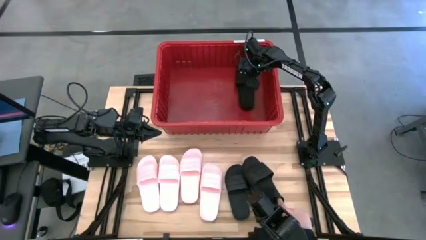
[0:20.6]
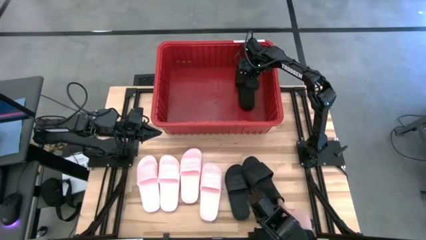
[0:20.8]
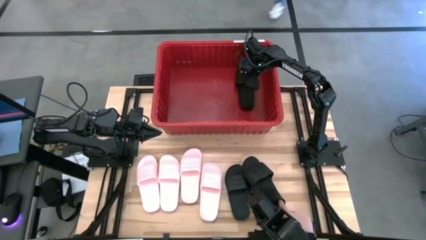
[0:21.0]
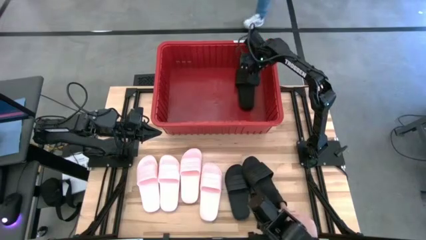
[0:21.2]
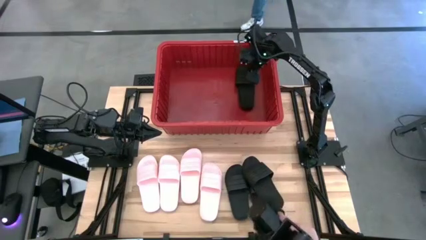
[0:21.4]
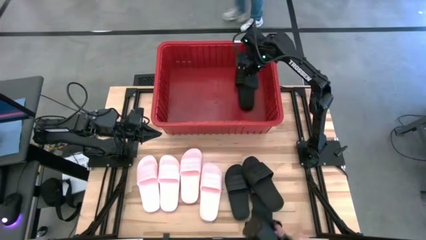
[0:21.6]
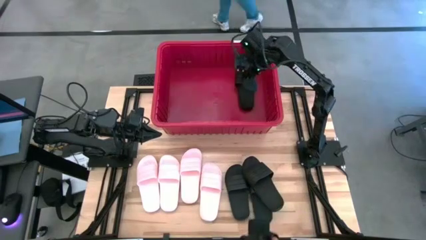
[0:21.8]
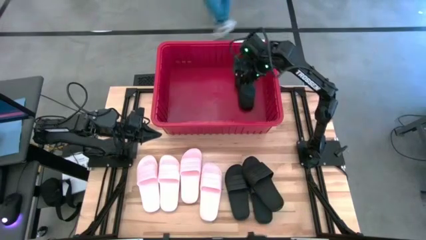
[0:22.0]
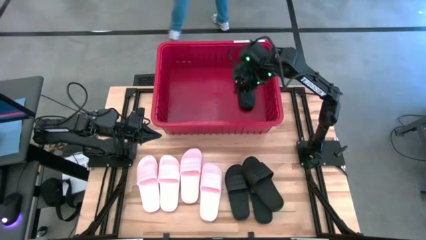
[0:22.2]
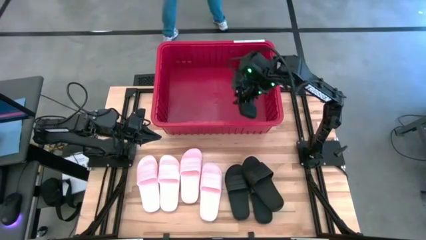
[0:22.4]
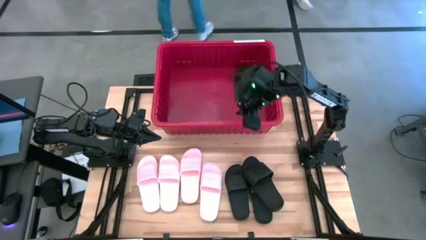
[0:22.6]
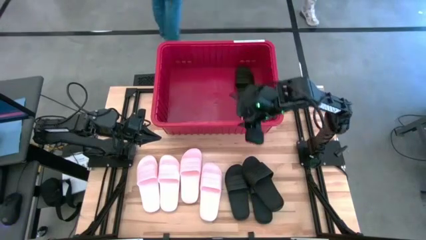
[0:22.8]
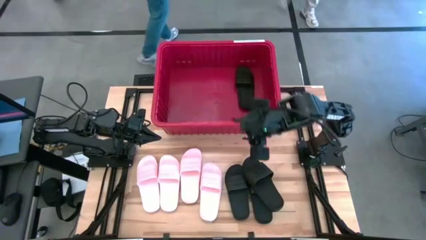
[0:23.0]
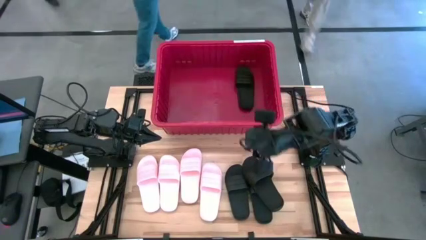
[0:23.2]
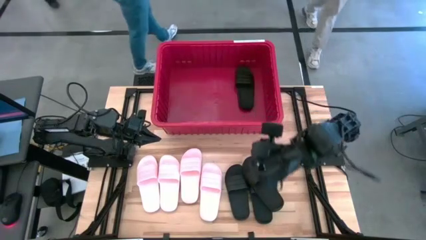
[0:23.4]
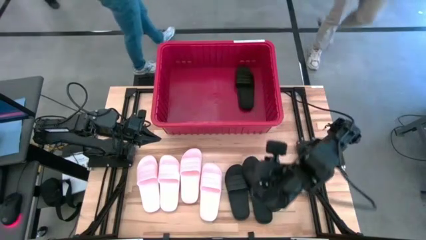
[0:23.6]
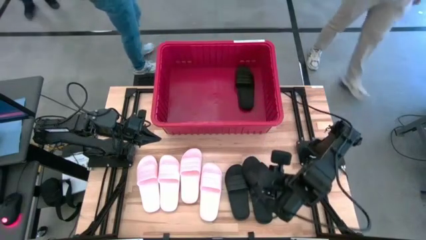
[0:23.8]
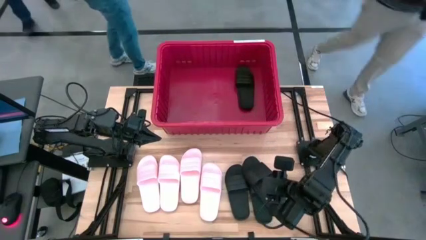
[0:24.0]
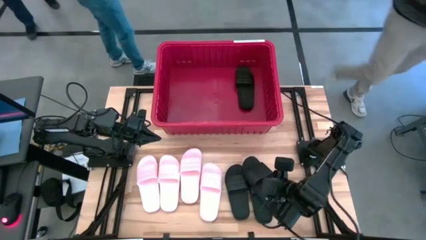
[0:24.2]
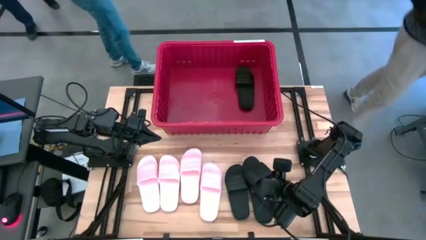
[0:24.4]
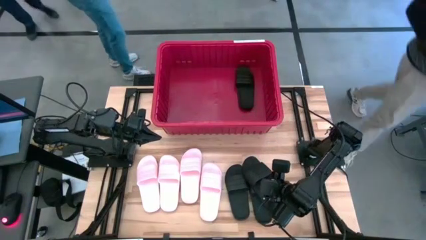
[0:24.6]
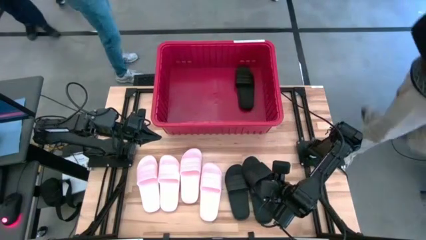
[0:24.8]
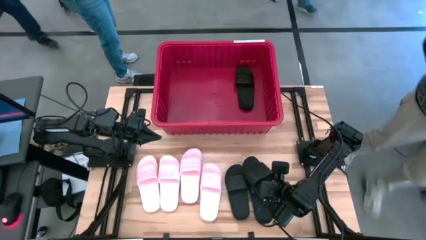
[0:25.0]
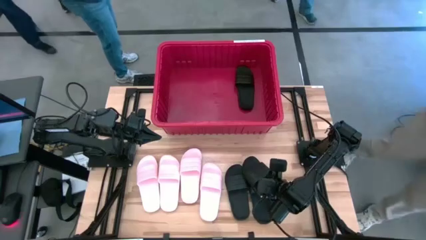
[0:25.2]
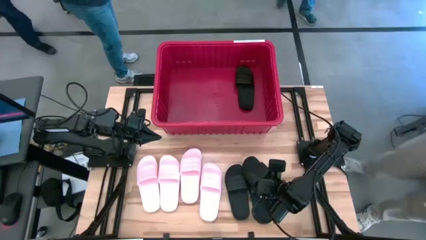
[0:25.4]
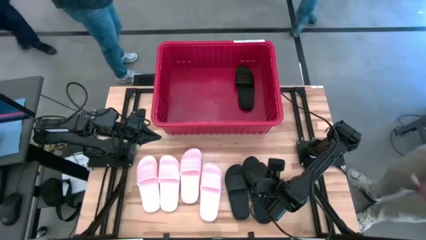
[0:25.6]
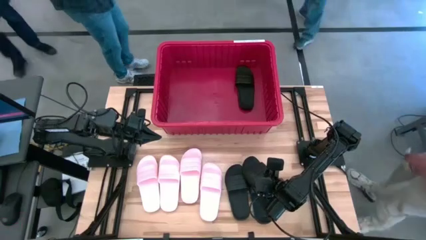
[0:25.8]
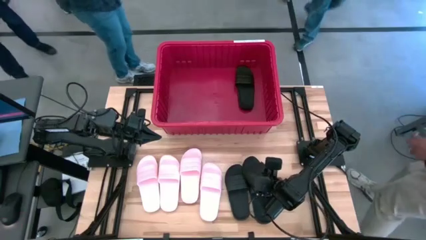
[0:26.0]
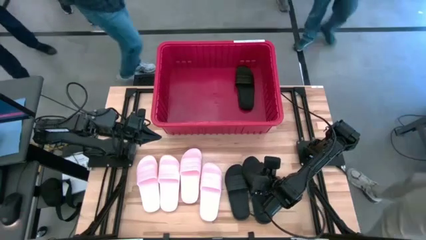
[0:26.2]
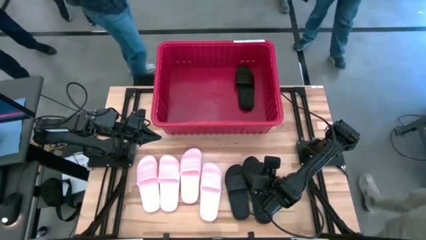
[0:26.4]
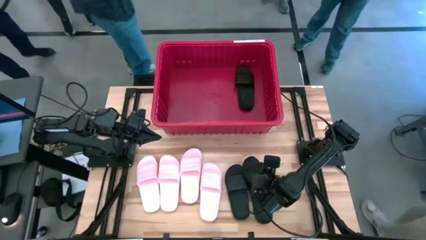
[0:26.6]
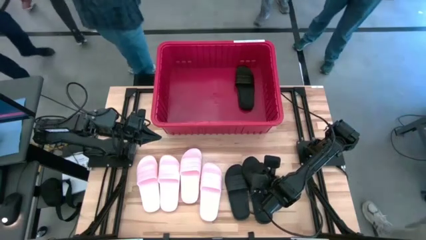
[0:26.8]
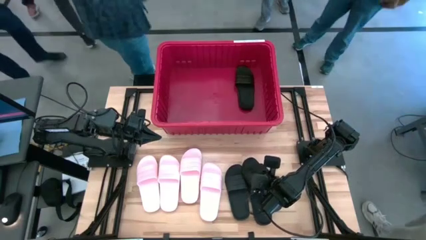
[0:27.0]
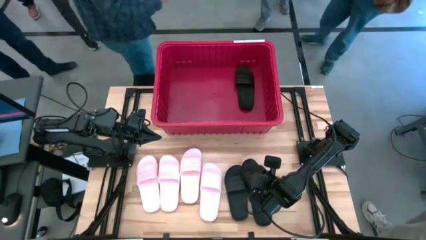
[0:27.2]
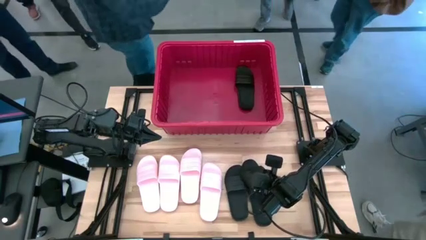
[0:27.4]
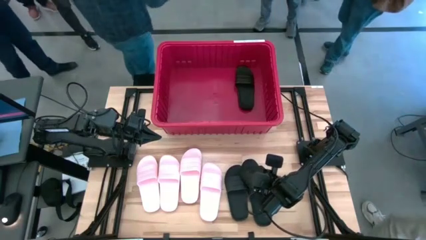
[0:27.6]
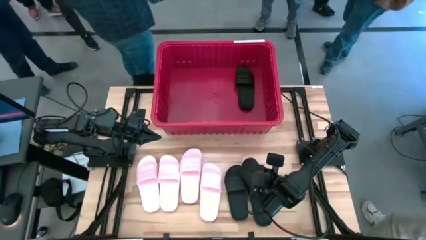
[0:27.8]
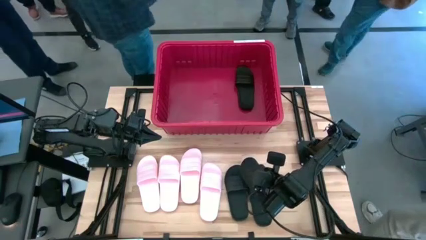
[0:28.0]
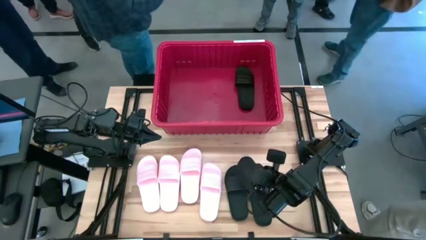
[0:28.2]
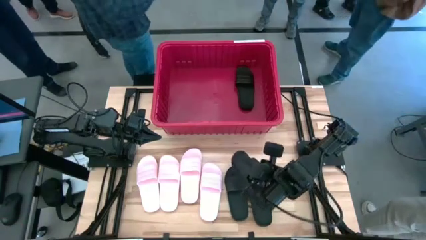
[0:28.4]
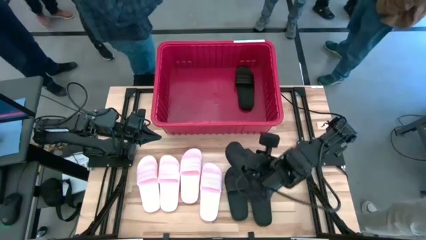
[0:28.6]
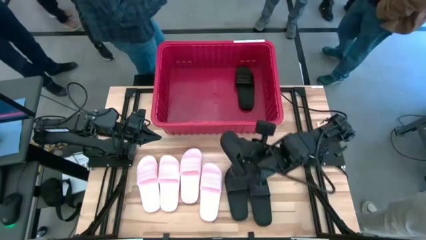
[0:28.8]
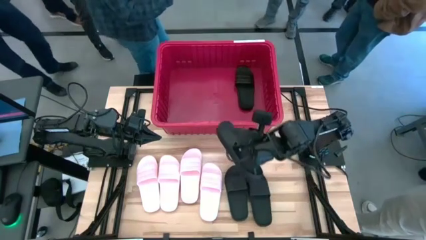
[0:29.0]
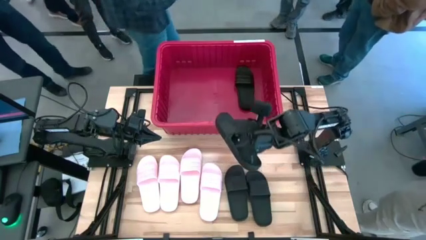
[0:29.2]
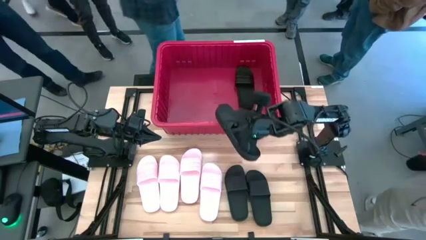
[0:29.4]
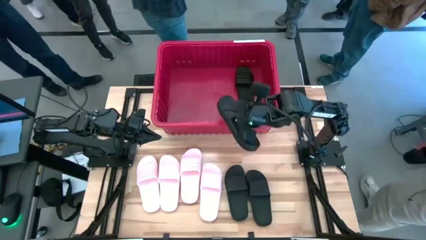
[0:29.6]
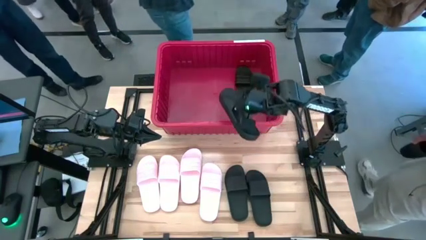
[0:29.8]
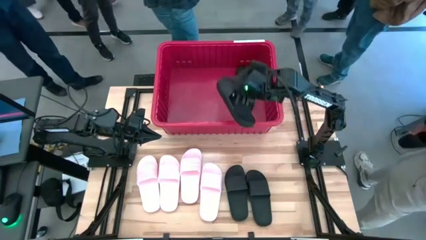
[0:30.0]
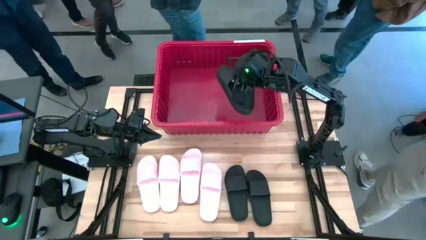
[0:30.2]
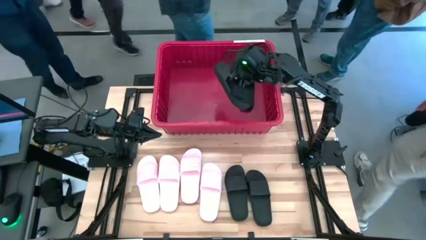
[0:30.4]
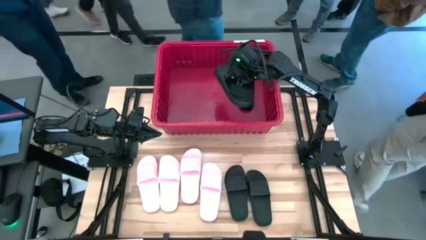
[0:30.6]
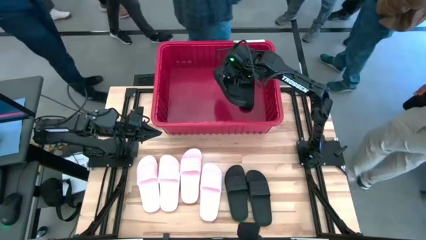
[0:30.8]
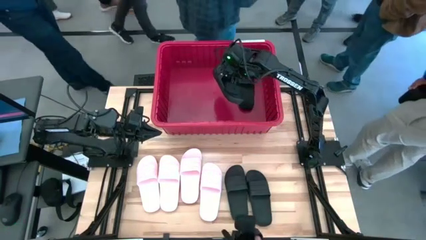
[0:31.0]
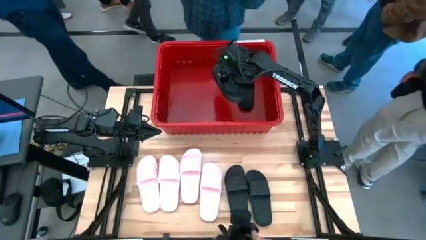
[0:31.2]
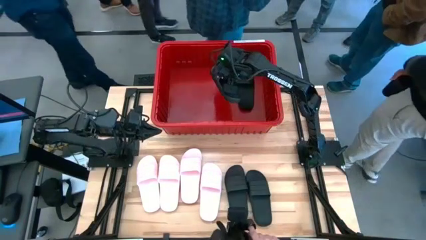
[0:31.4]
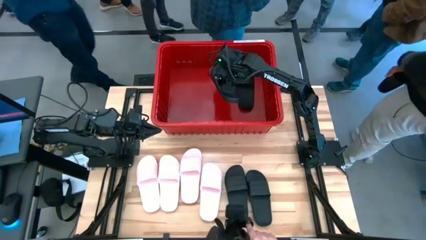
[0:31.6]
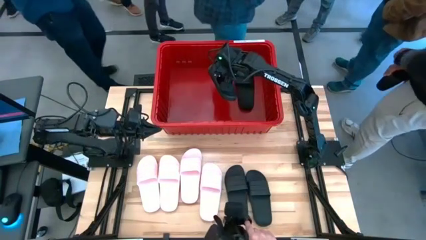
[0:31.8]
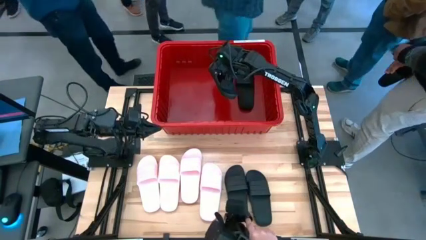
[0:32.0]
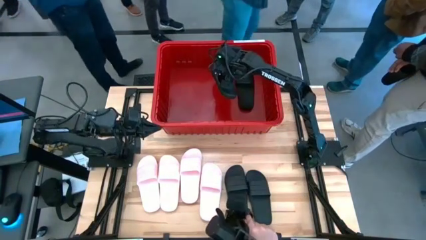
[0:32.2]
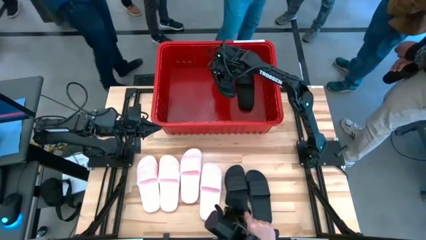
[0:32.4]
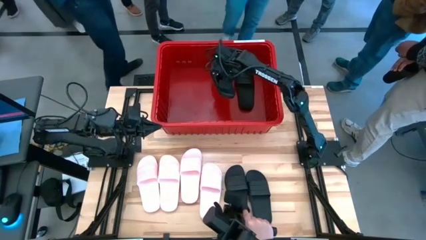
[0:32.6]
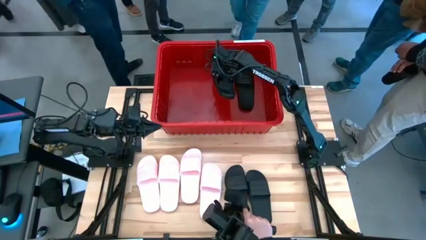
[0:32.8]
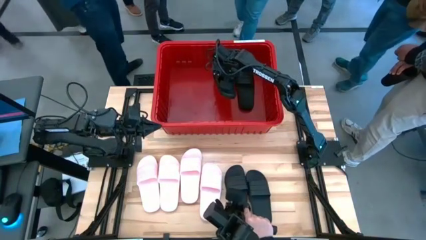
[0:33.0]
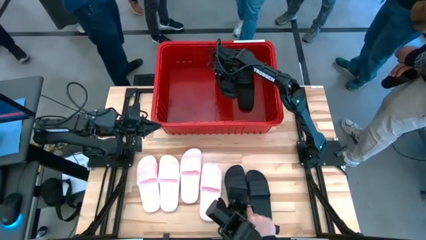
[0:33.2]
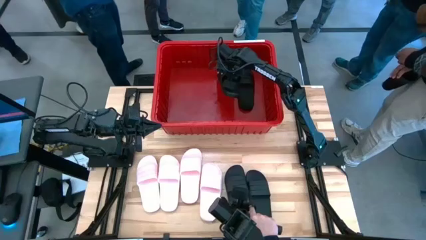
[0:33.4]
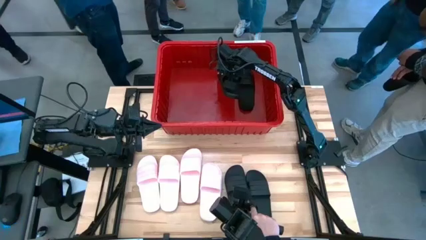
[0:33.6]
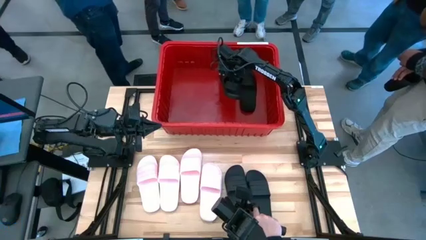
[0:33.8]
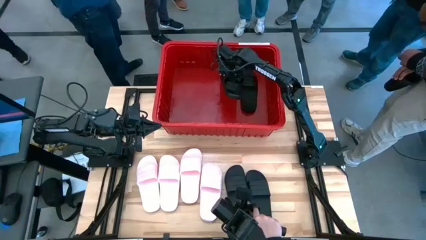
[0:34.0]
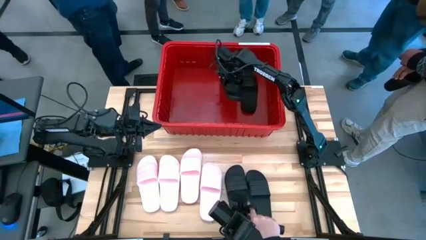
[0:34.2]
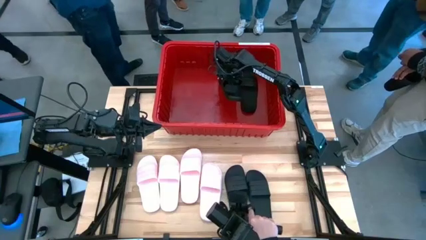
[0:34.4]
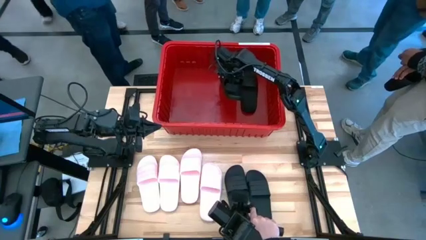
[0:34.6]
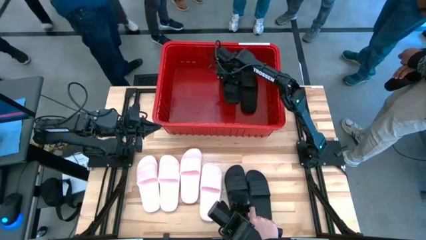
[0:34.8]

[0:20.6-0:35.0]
Task: Pick and place slides into bin
Put the black slide into the red container
